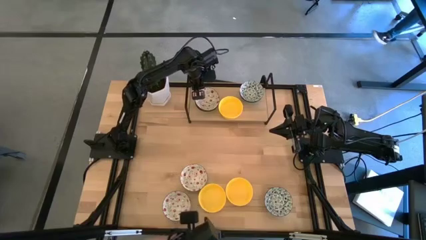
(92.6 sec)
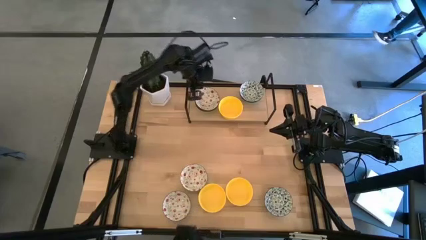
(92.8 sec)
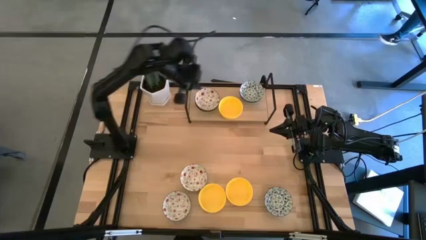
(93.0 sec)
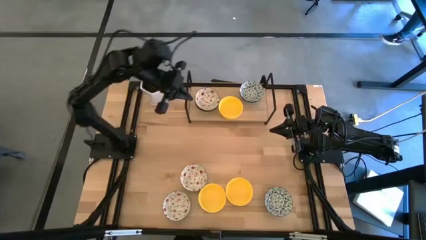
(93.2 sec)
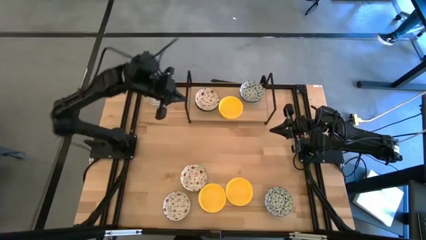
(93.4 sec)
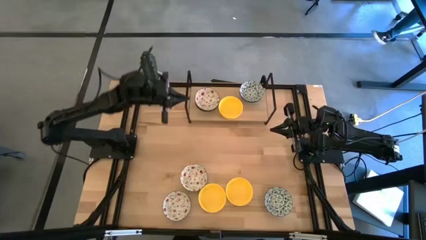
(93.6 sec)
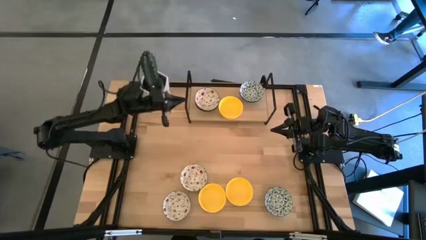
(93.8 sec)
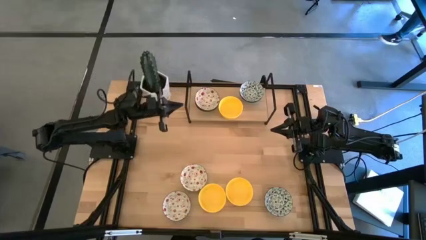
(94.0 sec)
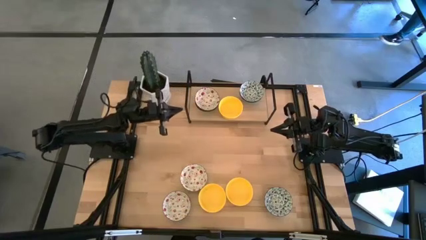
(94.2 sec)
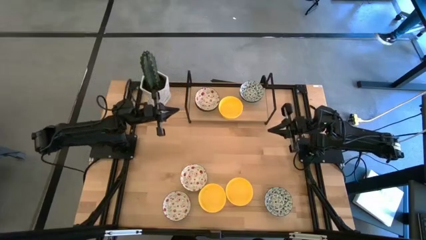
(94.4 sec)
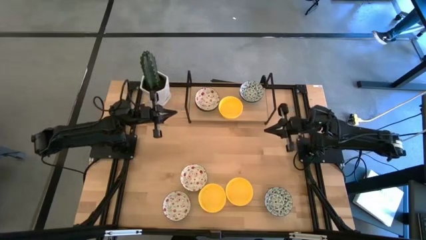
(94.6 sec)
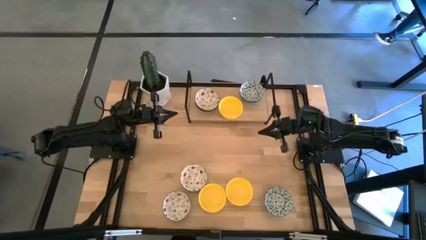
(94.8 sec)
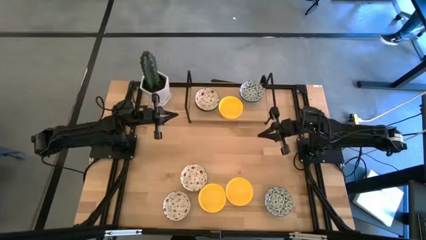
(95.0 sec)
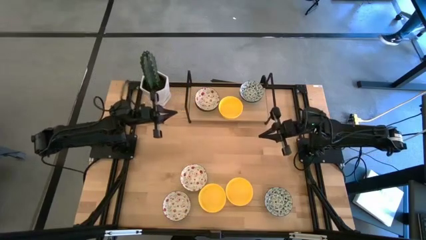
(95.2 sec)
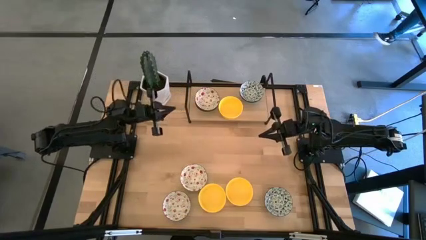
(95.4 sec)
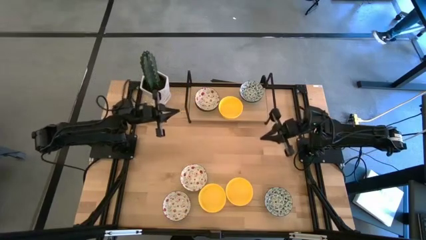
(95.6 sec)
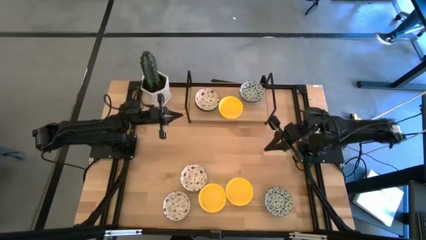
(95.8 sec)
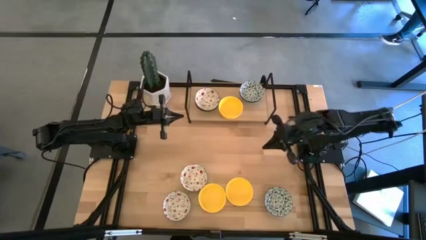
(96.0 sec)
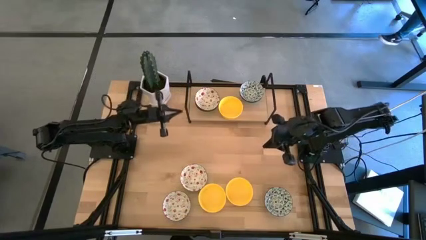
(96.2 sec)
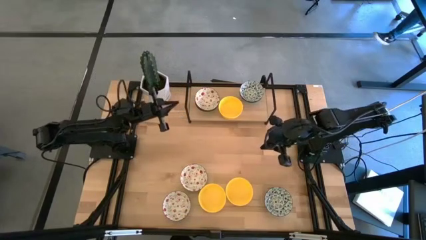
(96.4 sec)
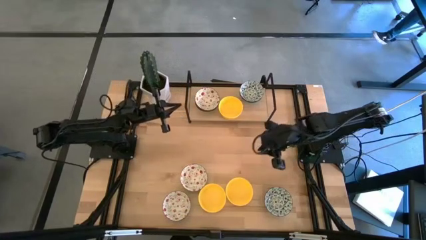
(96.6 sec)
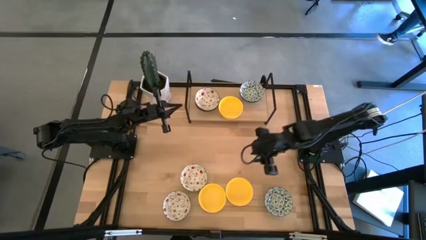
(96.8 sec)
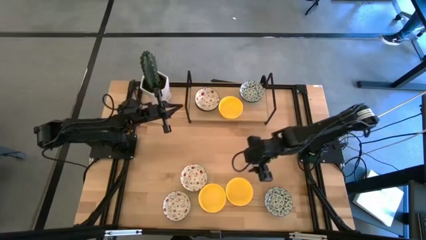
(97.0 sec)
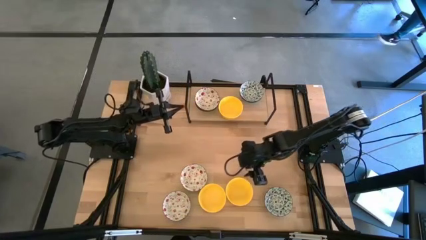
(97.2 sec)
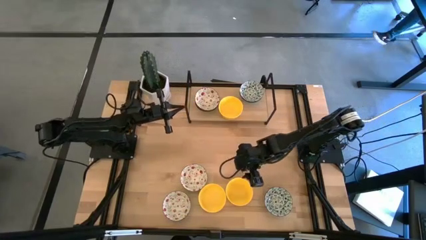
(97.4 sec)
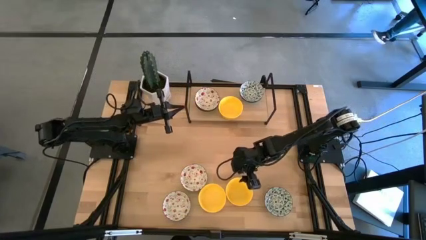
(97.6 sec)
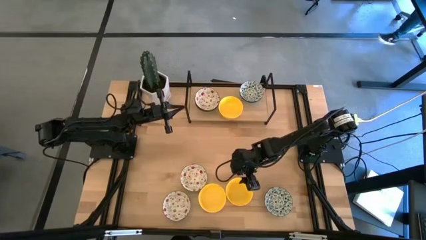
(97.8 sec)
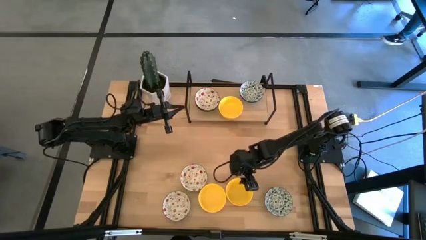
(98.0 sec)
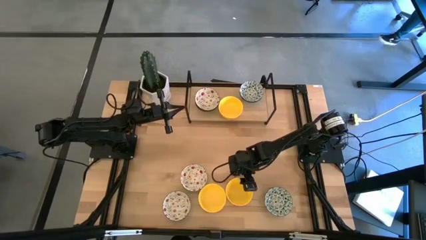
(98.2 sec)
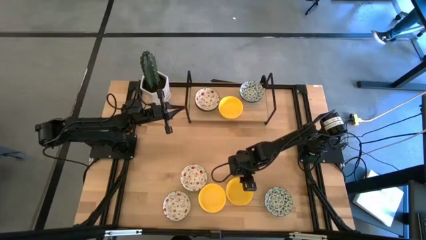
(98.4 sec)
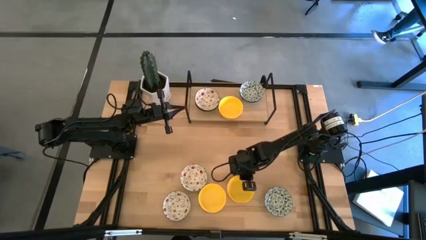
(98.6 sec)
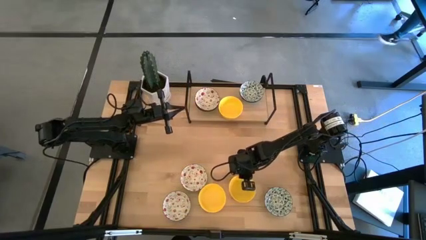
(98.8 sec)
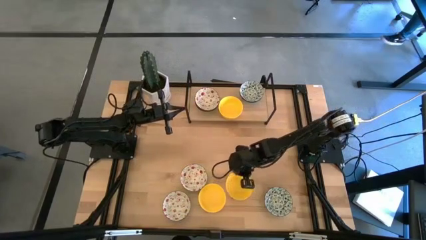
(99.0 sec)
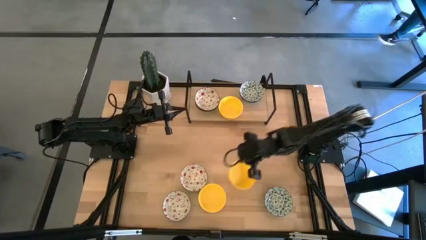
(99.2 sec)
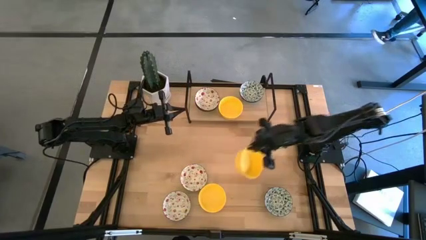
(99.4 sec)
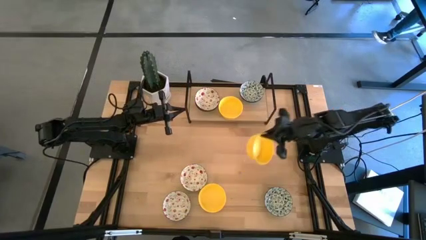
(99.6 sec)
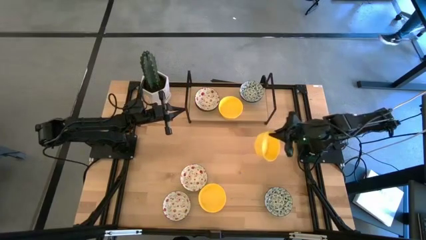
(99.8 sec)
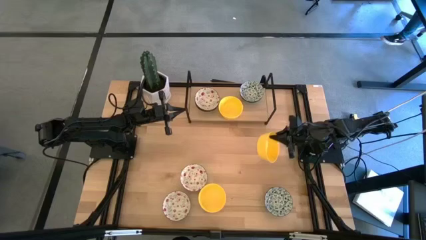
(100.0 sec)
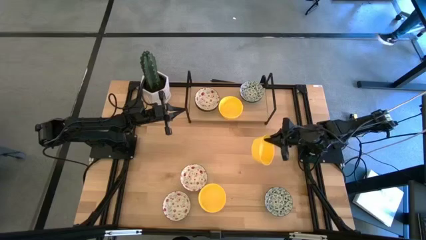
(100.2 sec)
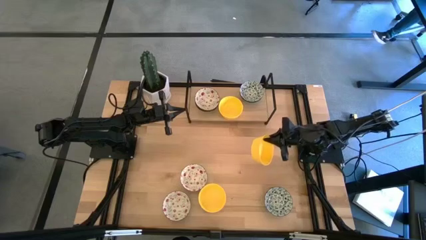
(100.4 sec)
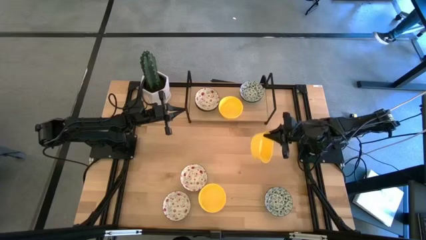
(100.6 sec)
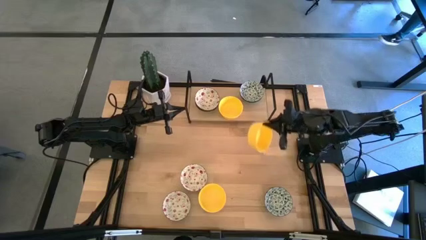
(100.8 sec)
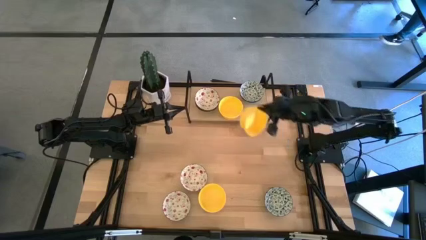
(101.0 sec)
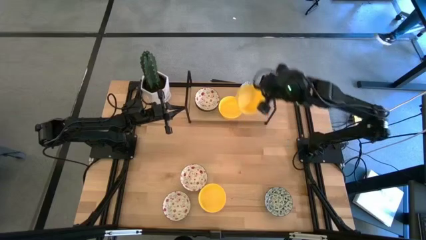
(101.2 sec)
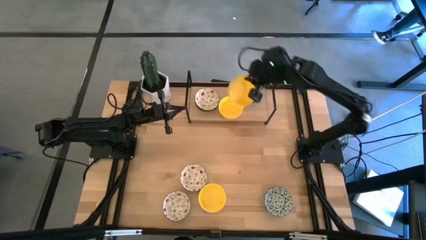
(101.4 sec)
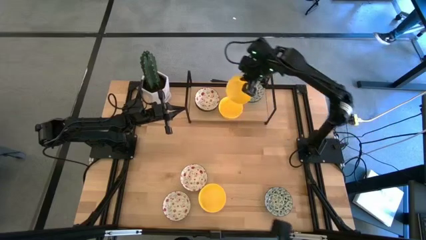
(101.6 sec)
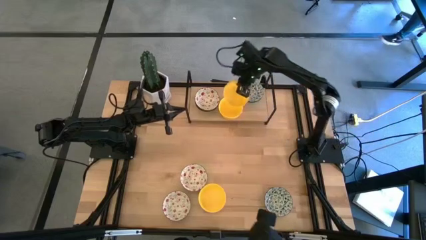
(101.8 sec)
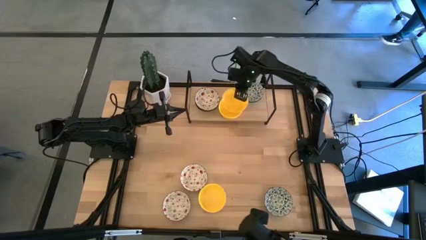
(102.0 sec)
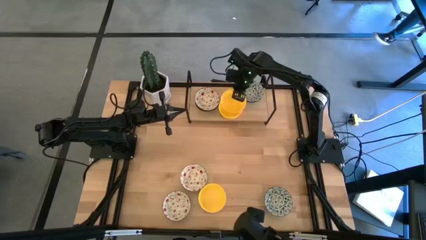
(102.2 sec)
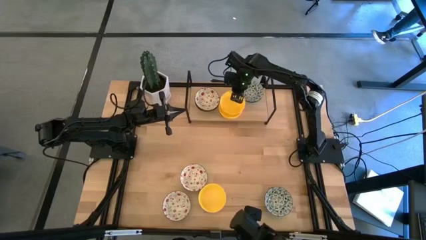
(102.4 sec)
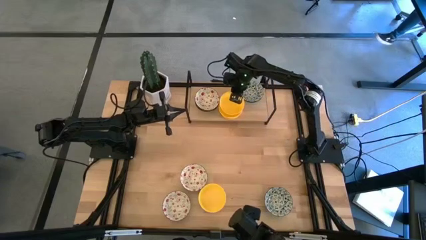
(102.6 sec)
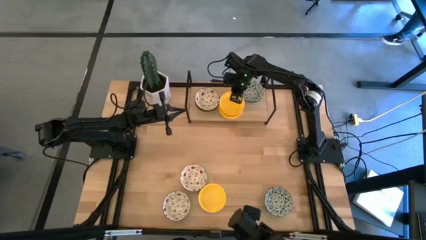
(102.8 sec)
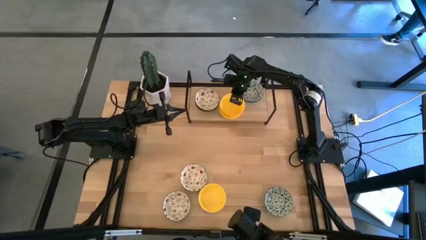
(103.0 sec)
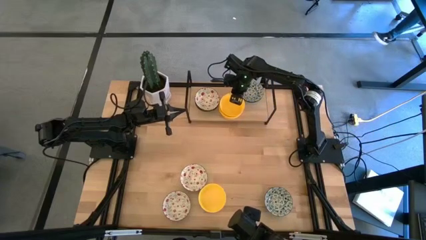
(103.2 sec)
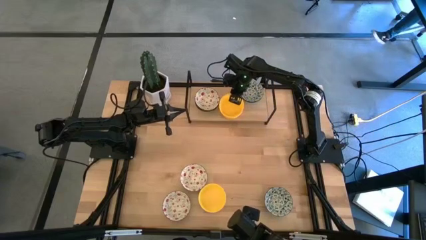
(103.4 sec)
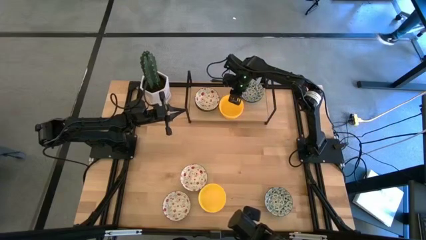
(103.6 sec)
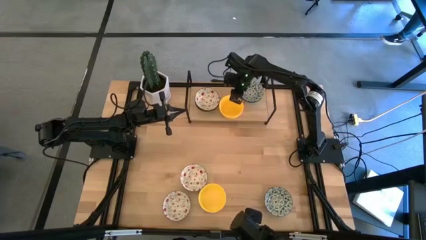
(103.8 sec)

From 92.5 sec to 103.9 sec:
Task: Pick & Place Mini bowls
Stack the yellow bowl on top of the yellow bowl on the shelf

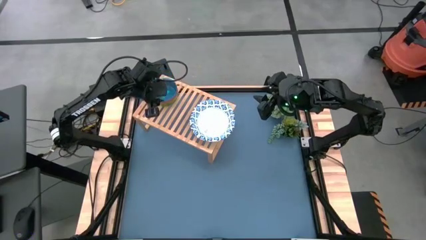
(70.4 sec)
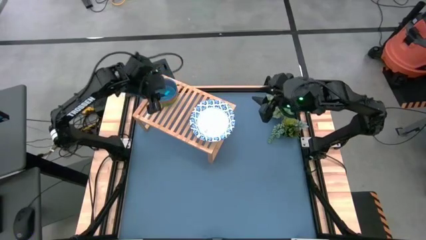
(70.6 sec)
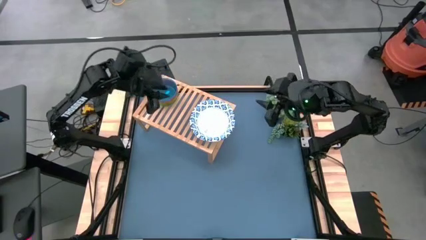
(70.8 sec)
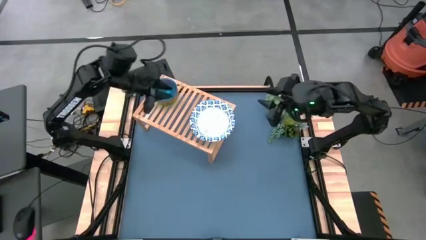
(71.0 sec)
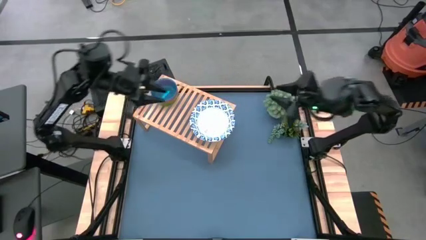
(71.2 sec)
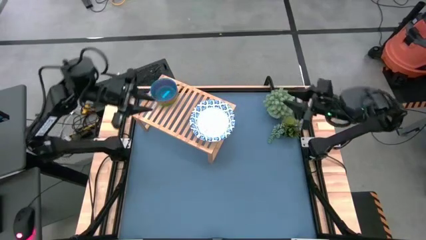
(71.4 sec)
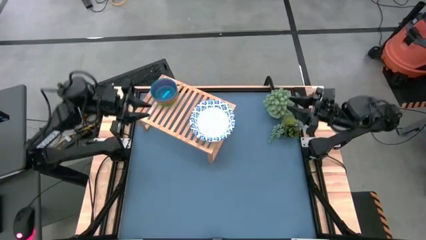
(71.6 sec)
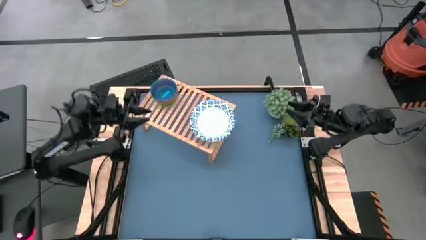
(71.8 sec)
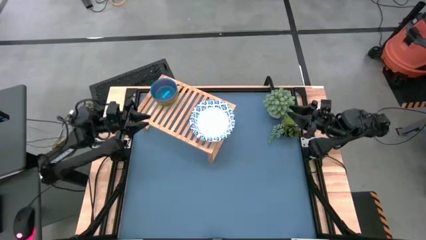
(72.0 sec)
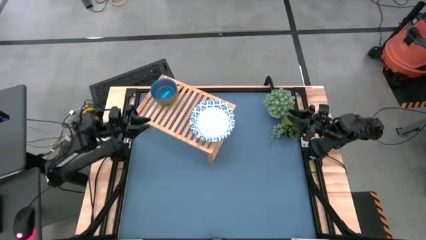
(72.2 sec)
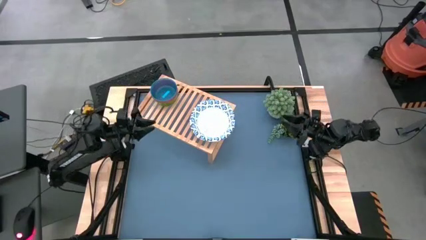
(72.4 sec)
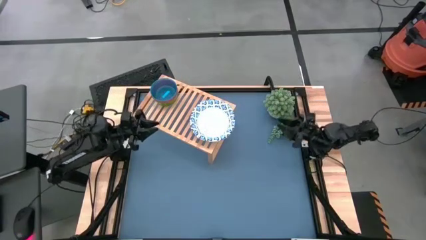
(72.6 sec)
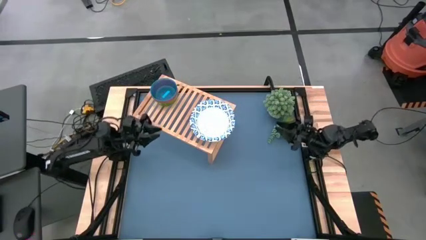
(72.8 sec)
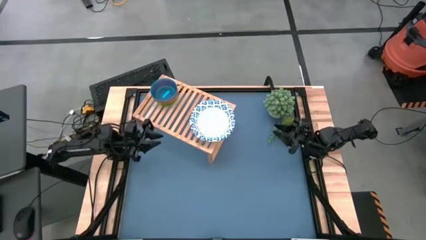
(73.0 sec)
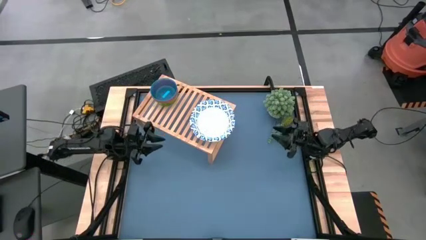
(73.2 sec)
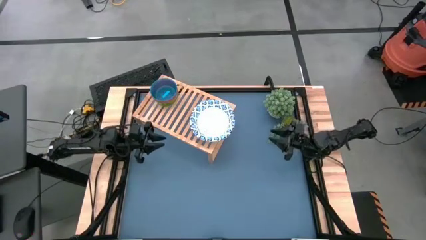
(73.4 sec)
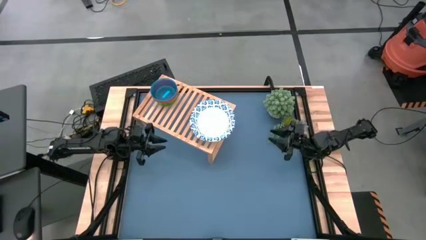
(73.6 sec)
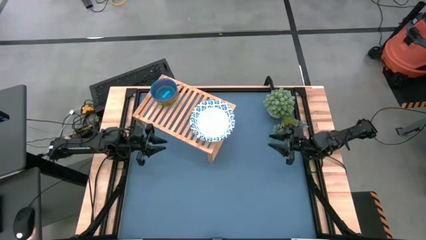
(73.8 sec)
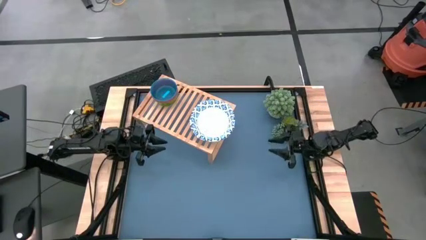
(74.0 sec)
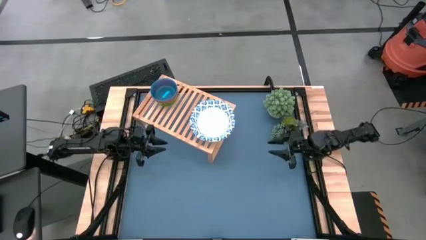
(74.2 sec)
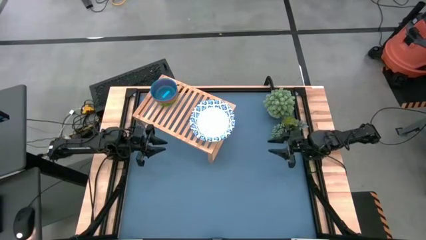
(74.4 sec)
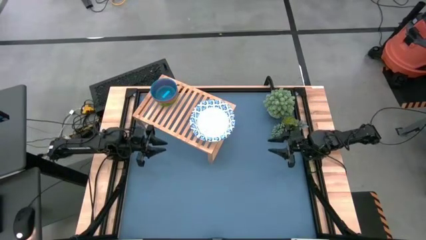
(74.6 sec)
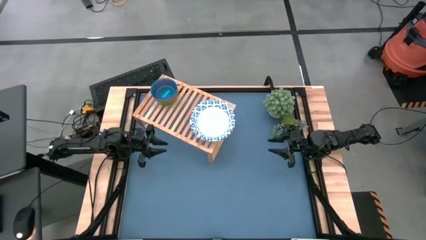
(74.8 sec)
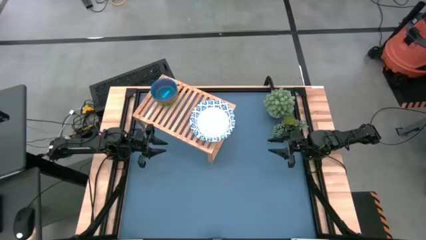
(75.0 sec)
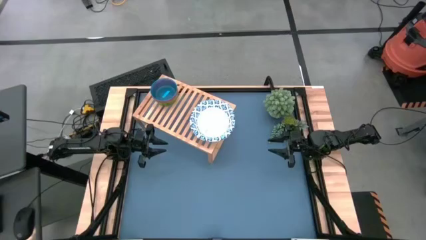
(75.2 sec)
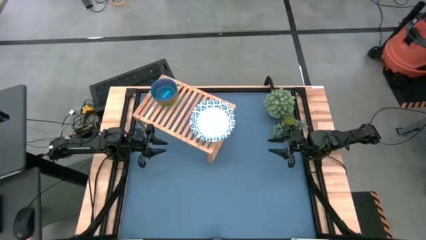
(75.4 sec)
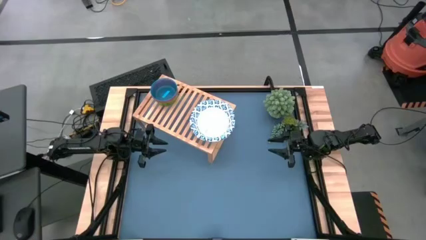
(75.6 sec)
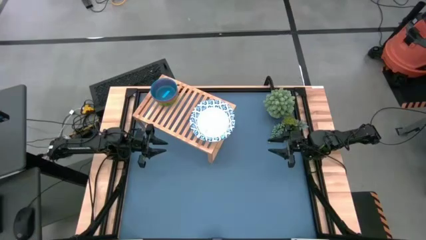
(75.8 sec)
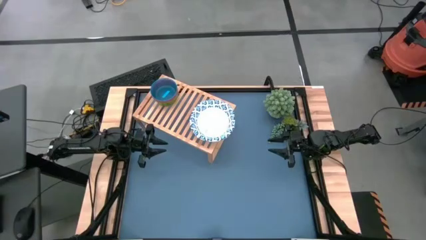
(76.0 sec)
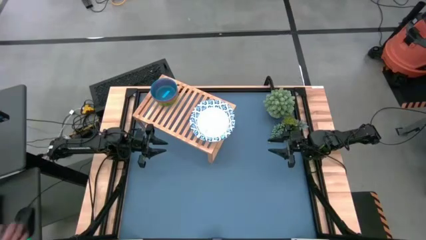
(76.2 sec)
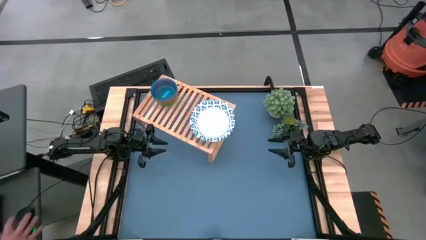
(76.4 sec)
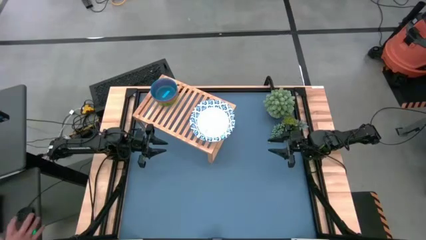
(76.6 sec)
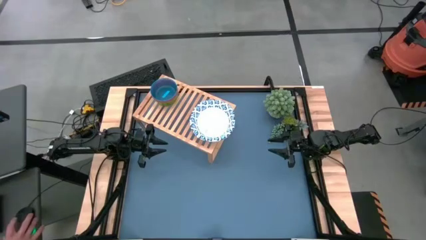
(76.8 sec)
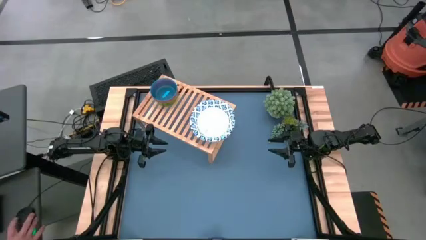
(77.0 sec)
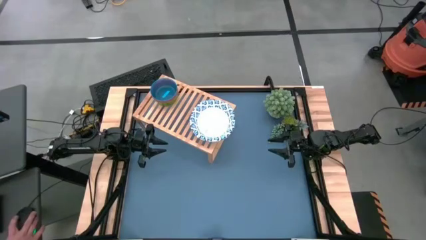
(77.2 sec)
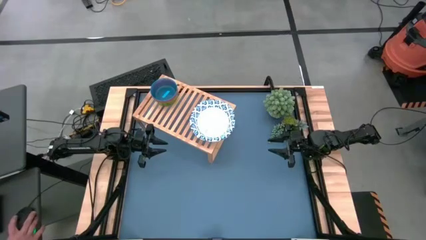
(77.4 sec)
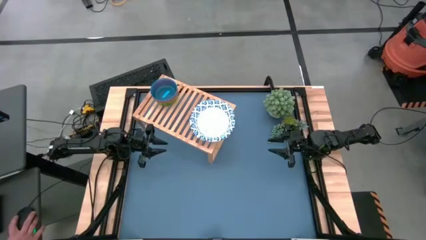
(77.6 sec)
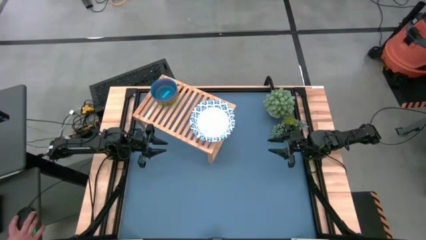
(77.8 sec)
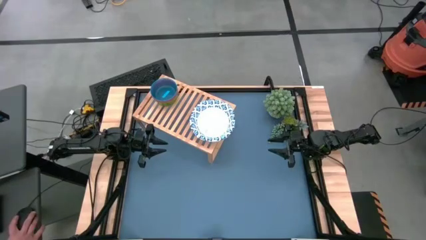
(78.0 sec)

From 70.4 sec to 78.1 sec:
Task: Place and stack bowls onto a shelf
Return to Home Position
